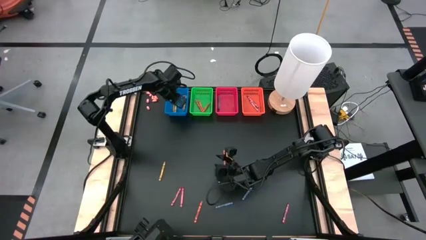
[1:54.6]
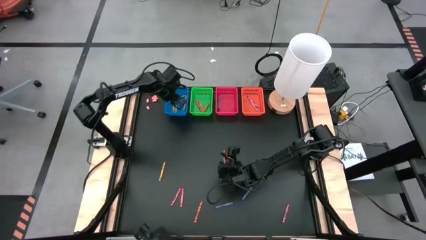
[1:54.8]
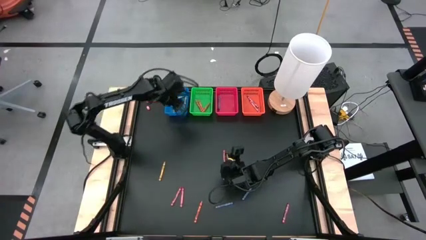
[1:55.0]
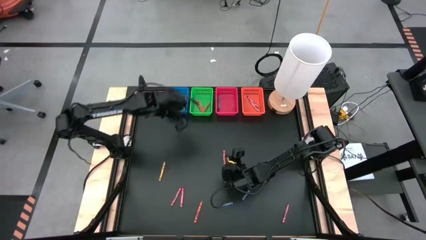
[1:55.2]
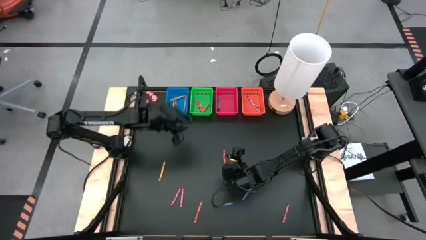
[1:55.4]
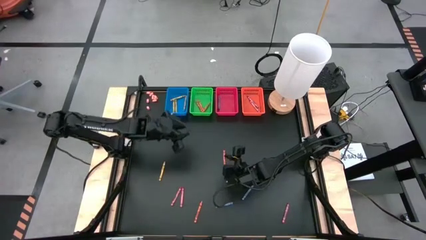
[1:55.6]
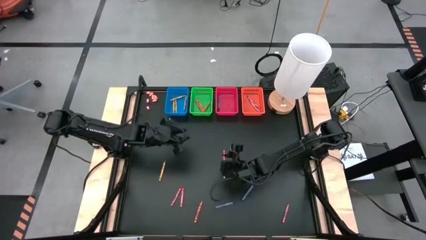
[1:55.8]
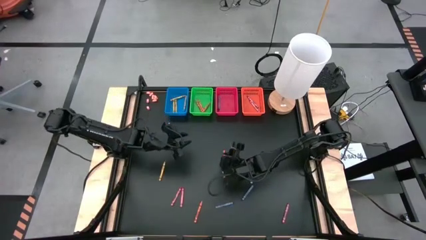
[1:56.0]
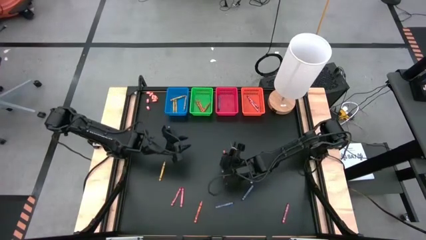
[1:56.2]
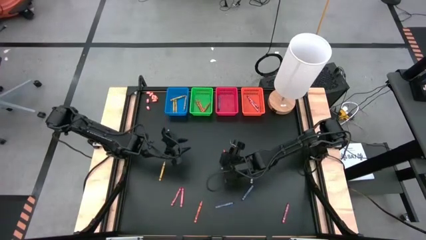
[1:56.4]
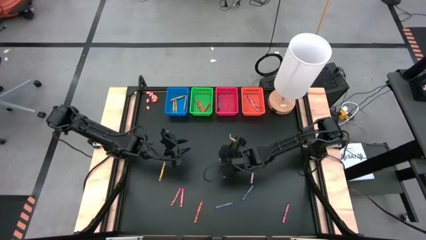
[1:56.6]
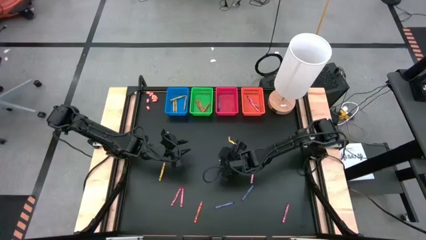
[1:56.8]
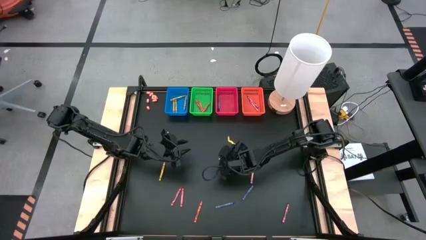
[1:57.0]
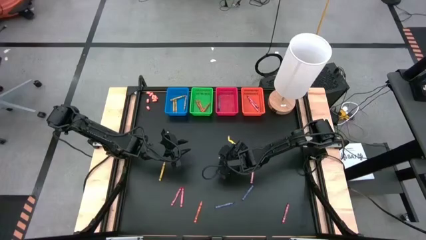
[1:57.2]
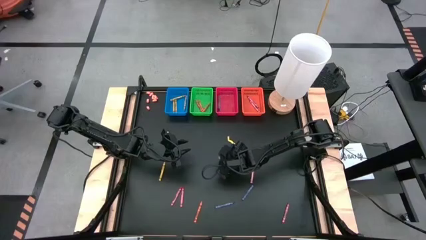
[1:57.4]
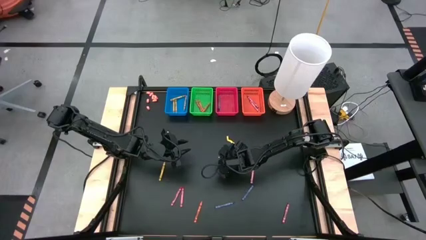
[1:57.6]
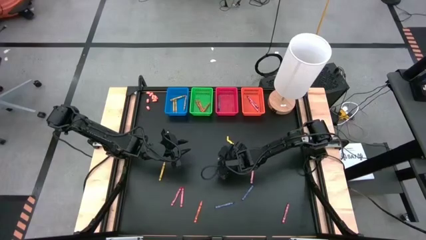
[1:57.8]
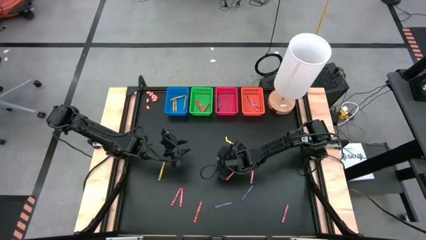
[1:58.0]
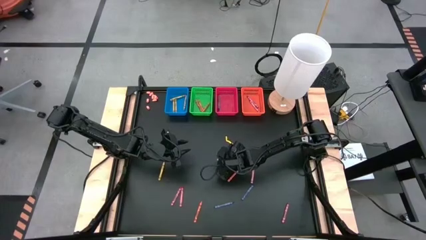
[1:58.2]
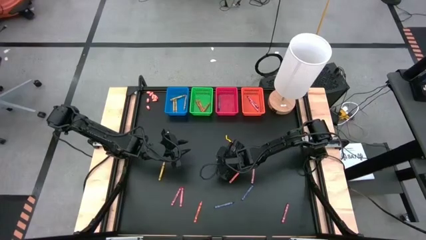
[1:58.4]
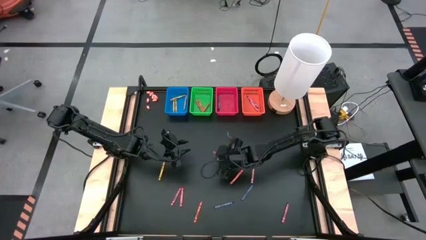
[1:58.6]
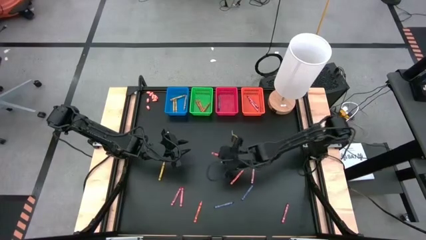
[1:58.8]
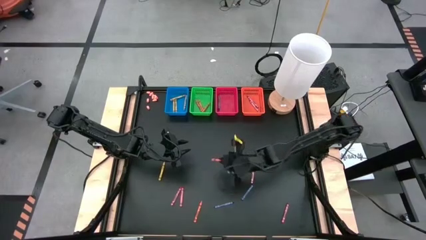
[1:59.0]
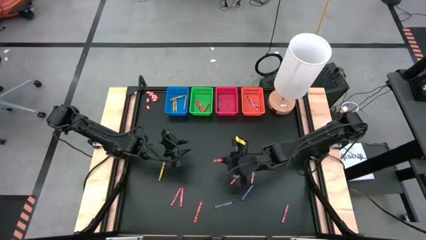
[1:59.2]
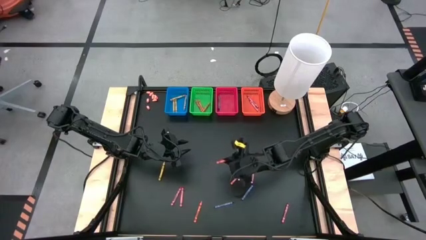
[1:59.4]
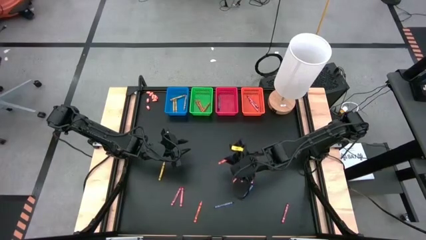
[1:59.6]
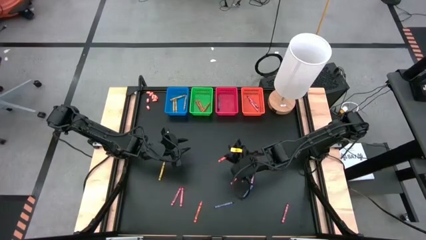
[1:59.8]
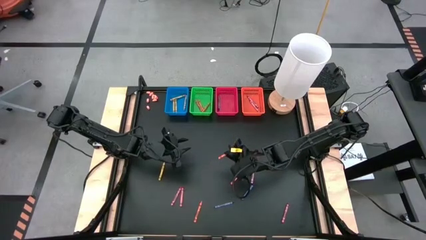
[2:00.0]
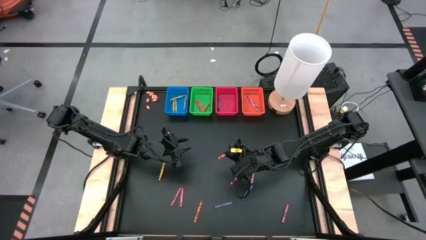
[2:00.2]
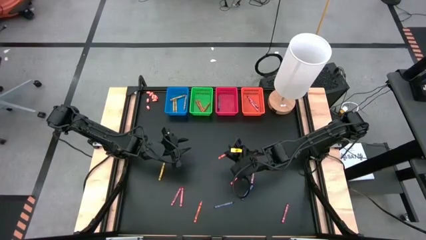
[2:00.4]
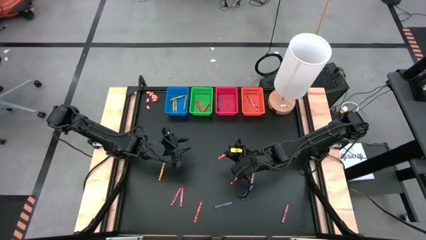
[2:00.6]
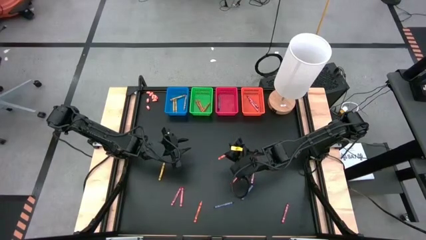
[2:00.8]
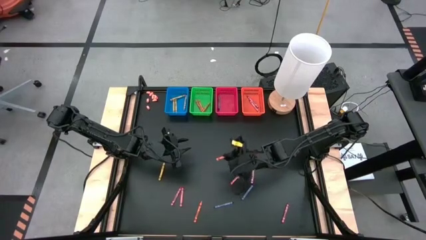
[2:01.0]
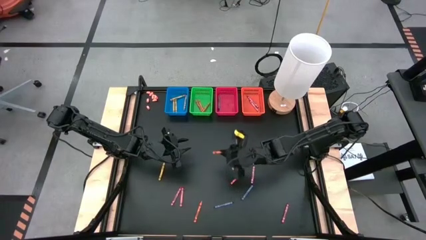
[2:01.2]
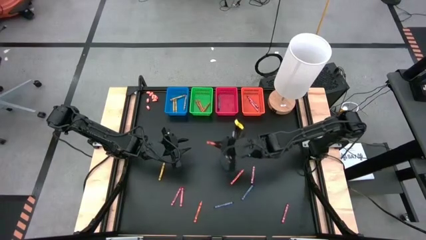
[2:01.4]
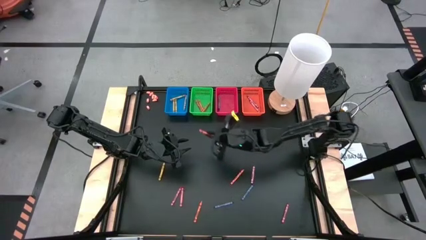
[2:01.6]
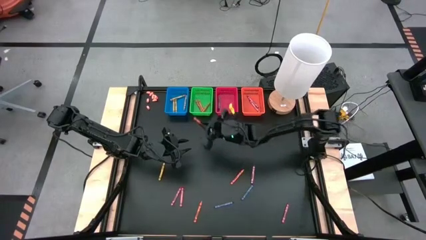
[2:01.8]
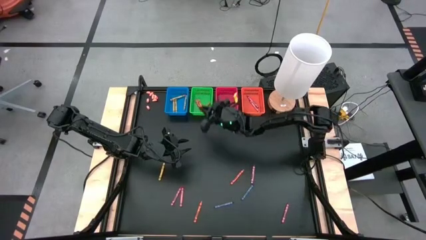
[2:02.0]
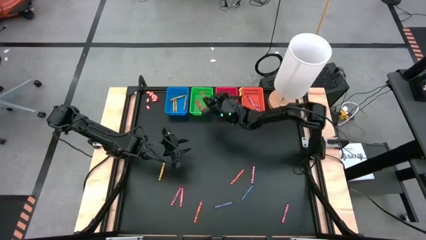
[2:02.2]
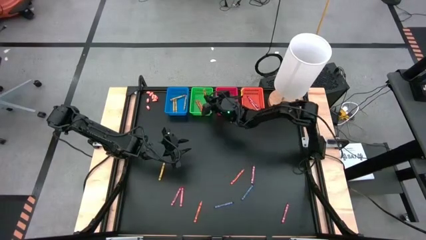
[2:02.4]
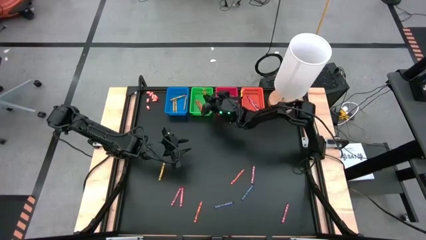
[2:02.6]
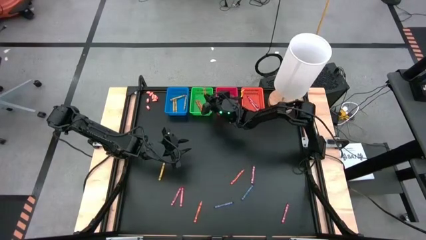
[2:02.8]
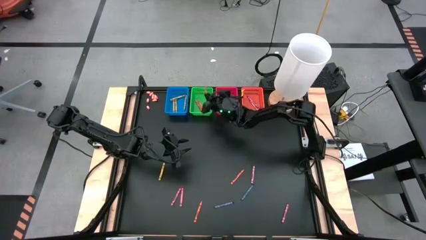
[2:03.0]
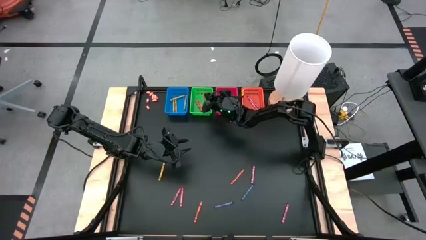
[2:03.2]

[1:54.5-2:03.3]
Task: Sort crayons
Put the orange crayon into the green bin

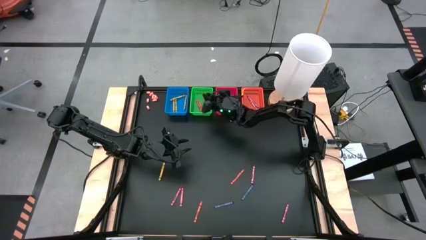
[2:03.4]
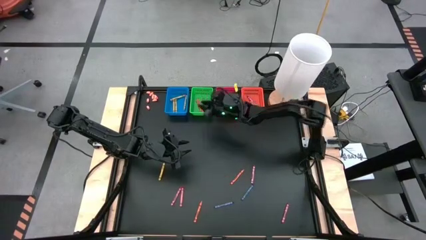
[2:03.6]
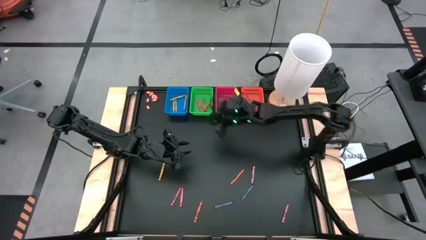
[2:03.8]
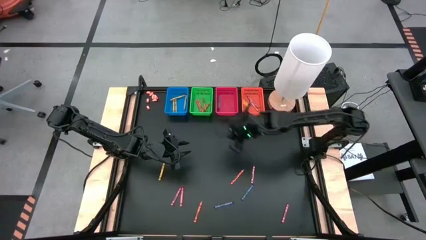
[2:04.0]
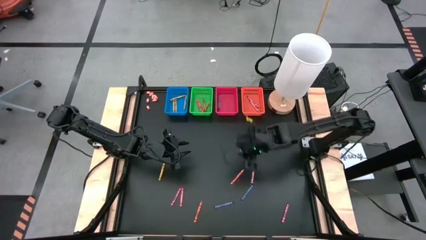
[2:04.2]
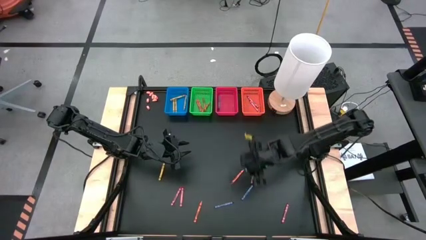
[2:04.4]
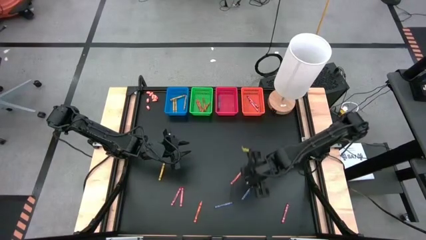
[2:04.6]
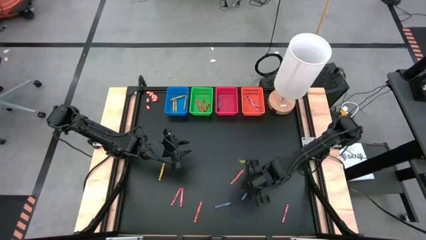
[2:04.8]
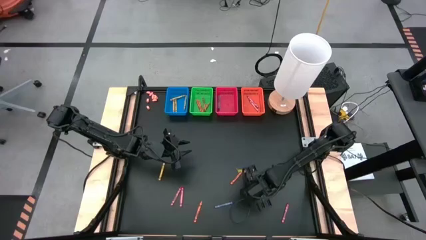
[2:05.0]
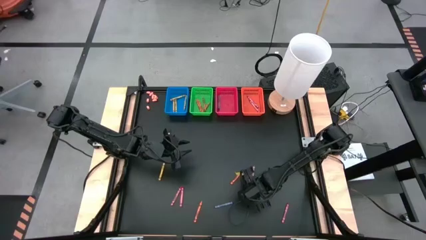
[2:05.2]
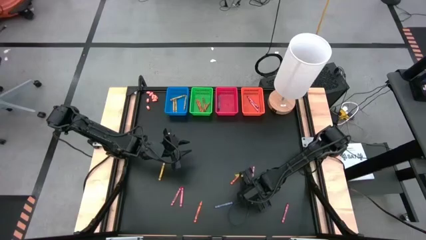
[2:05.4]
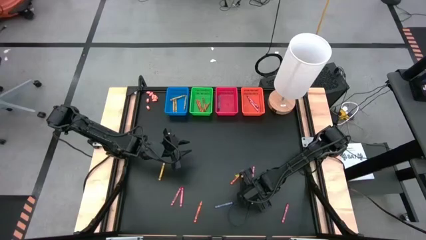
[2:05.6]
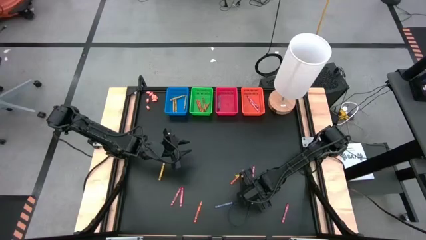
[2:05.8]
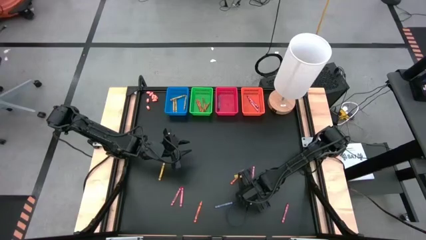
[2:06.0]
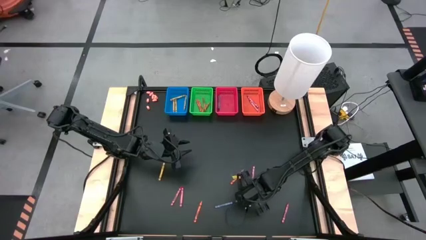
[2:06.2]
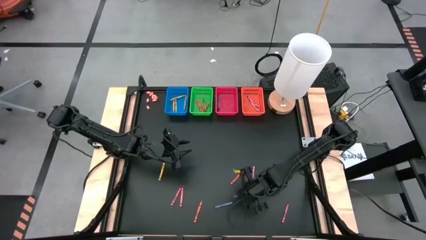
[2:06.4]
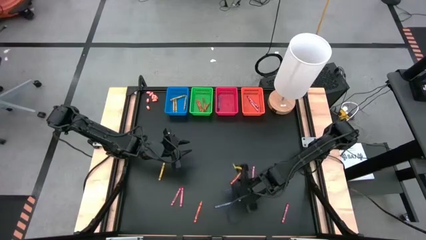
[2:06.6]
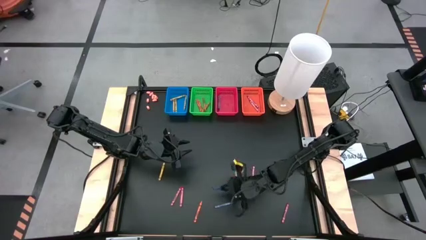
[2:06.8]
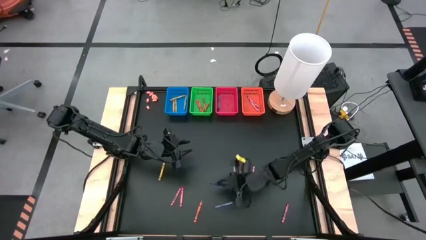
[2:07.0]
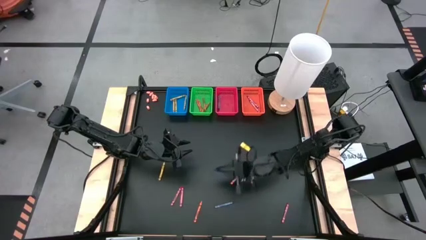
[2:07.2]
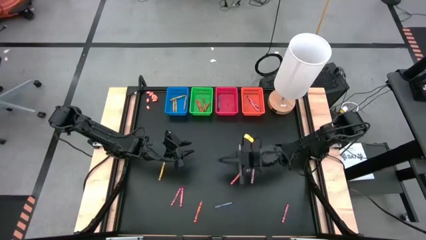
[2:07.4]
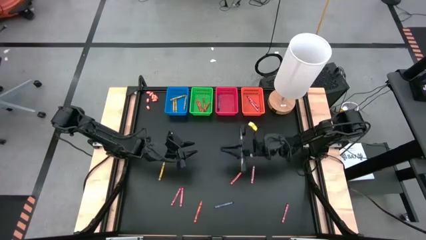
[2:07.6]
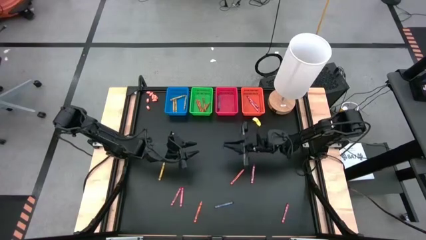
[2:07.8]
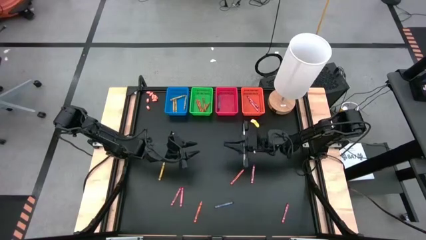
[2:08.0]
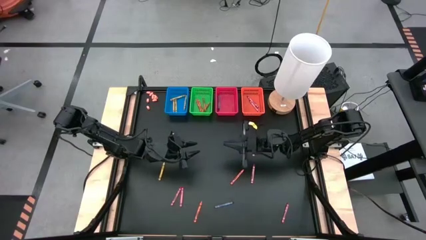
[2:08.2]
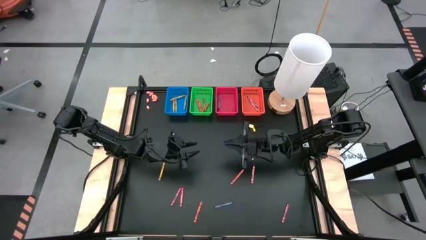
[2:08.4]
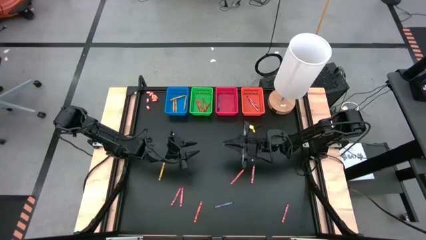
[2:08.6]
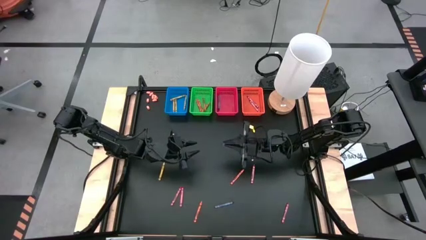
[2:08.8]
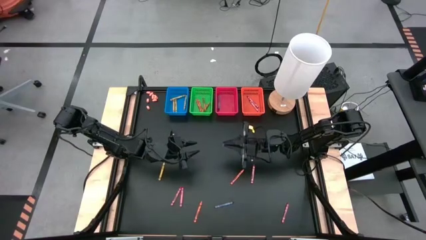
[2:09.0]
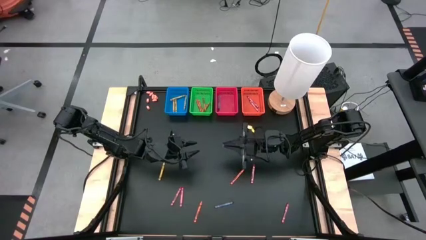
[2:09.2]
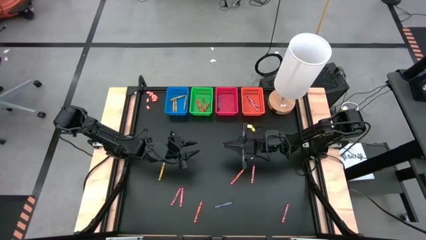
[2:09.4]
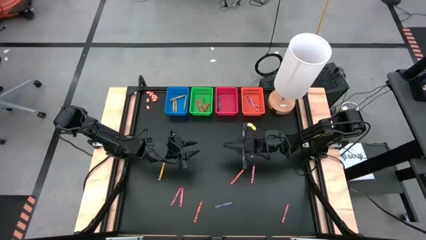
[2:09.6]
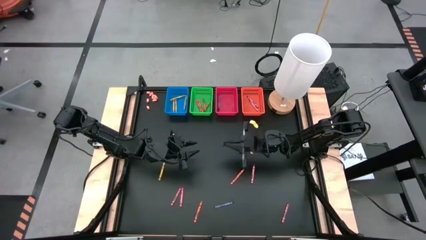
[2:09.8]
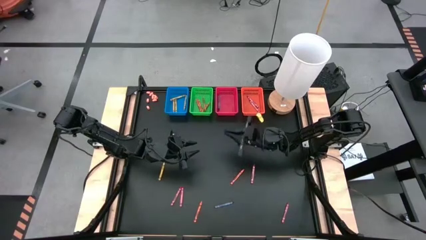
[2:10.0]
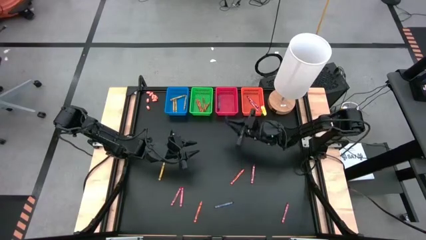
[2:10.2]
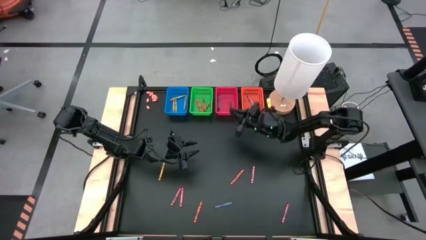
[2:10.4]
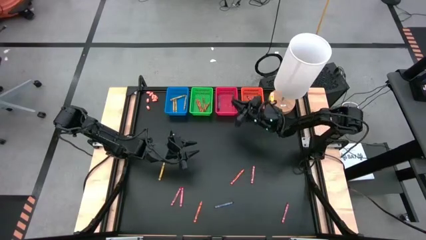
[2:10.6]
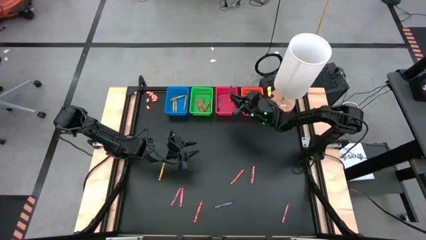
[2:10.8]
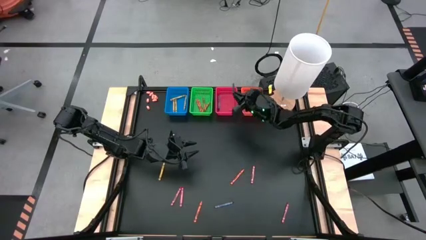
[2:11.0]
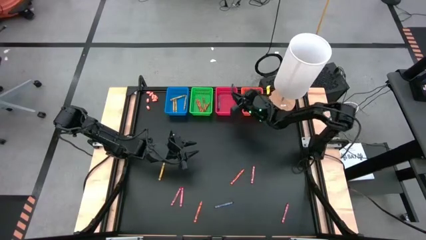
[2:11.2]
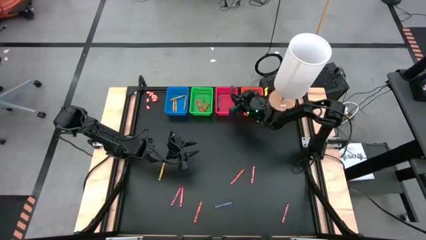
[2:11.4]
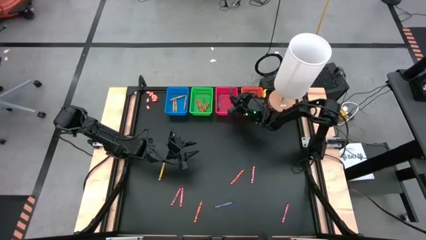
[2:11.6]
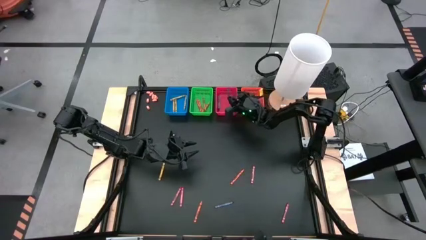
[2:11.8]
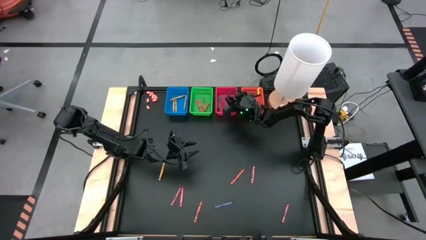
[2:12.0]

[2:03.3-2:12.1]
Put the blue crayon into the red bin
